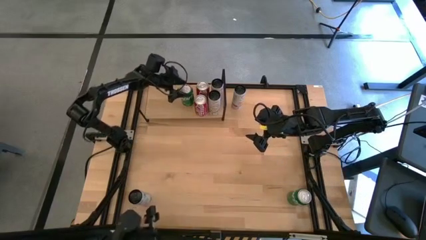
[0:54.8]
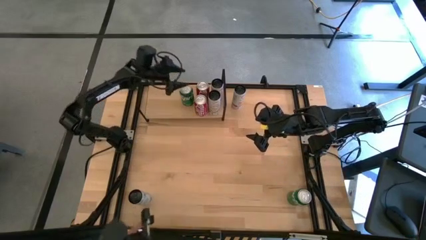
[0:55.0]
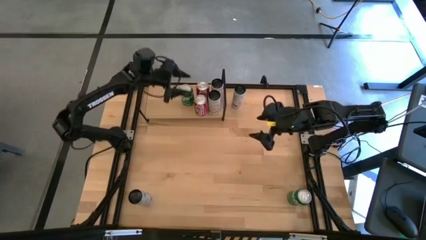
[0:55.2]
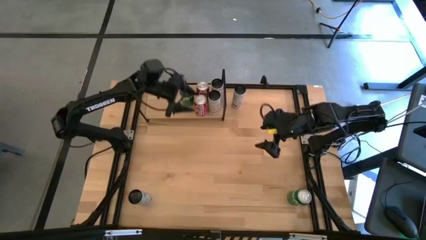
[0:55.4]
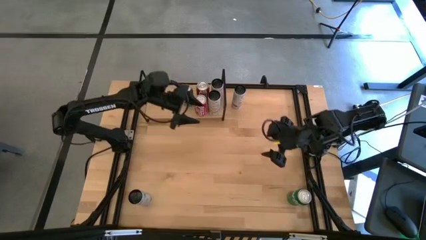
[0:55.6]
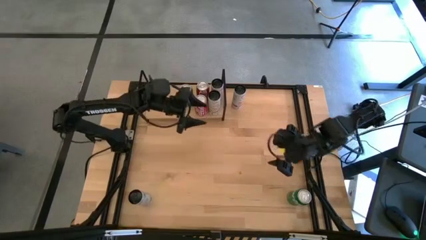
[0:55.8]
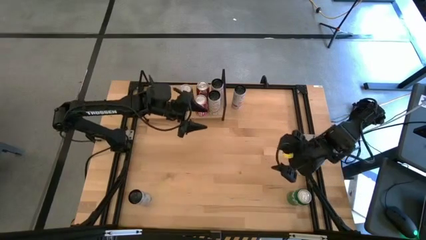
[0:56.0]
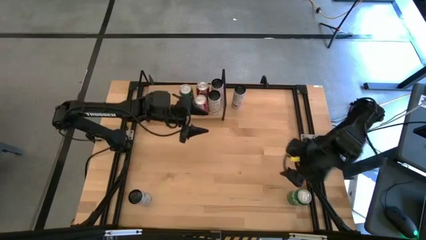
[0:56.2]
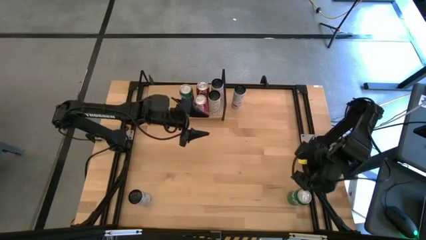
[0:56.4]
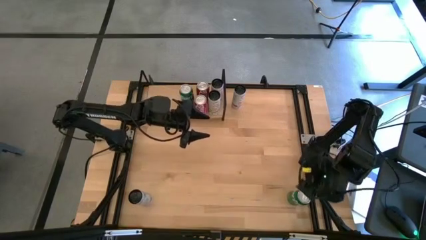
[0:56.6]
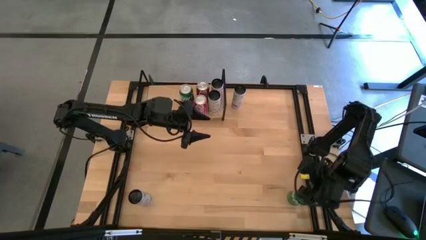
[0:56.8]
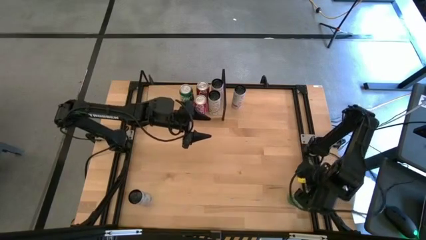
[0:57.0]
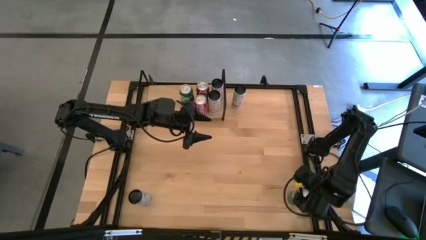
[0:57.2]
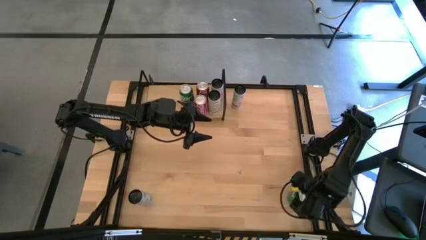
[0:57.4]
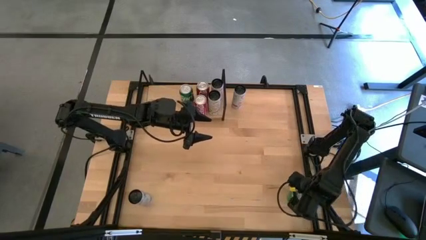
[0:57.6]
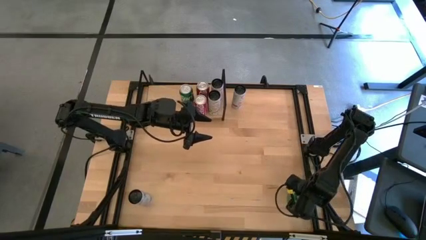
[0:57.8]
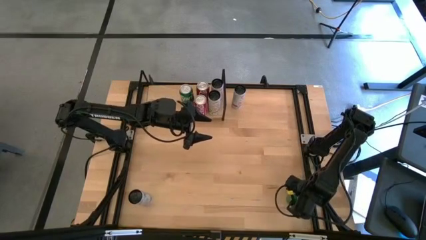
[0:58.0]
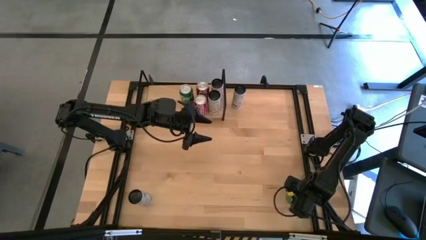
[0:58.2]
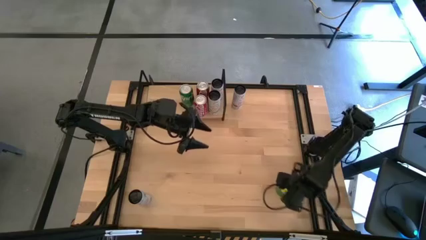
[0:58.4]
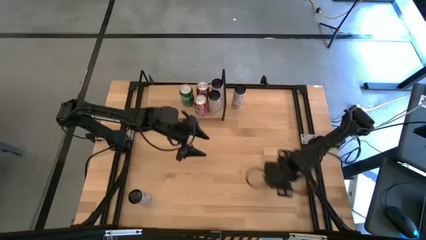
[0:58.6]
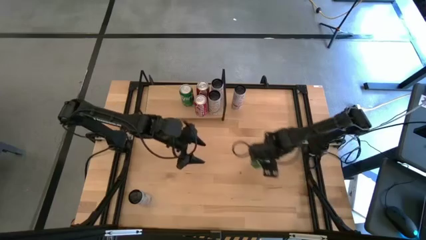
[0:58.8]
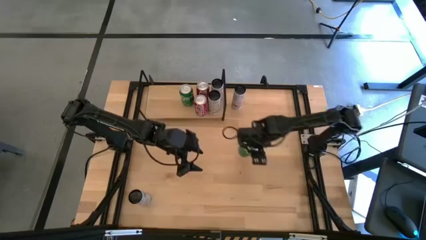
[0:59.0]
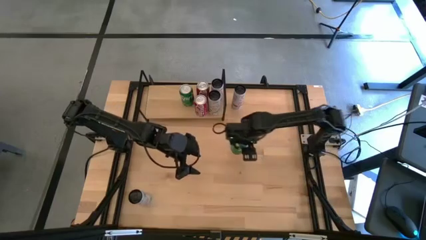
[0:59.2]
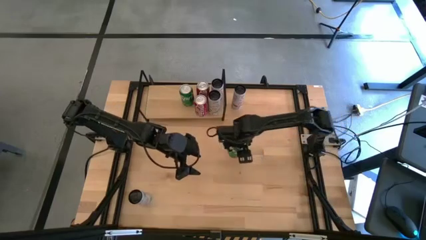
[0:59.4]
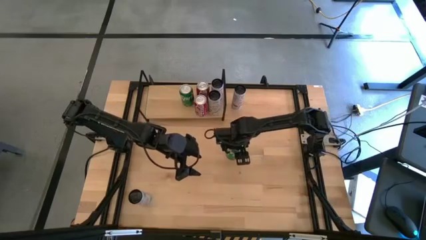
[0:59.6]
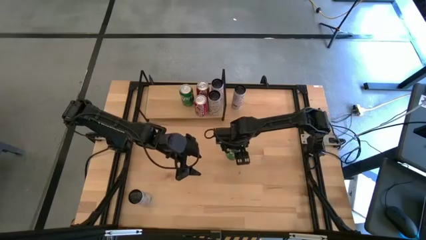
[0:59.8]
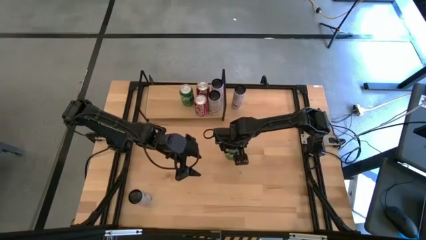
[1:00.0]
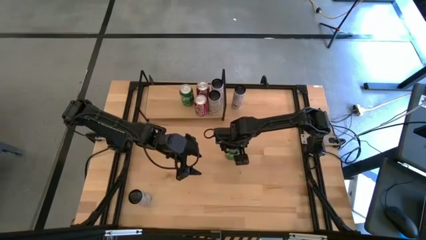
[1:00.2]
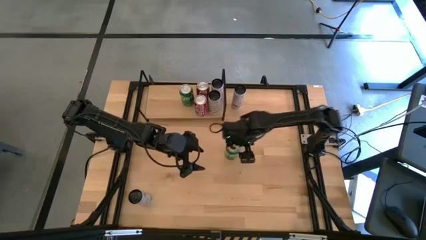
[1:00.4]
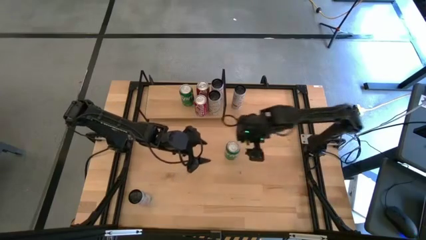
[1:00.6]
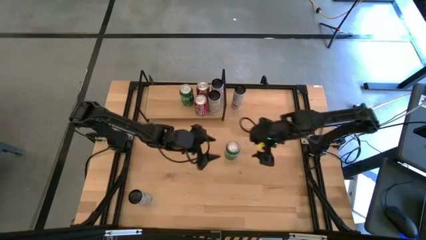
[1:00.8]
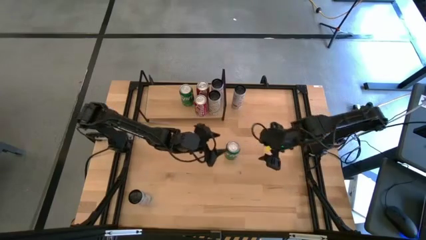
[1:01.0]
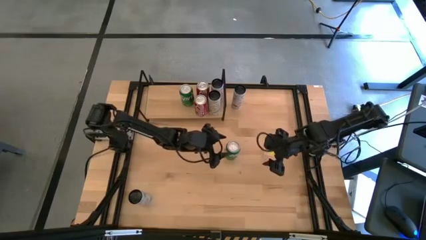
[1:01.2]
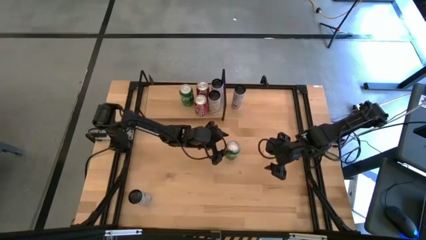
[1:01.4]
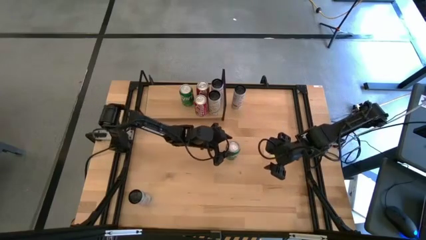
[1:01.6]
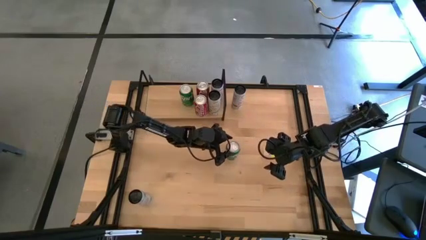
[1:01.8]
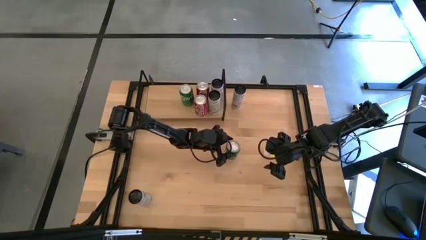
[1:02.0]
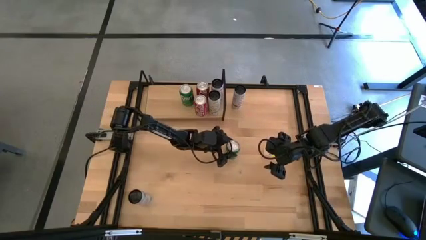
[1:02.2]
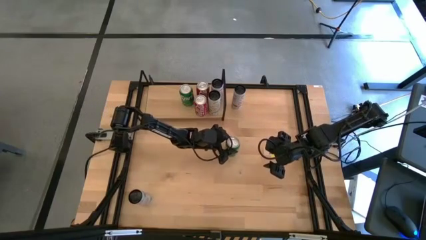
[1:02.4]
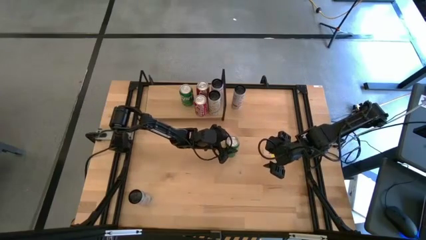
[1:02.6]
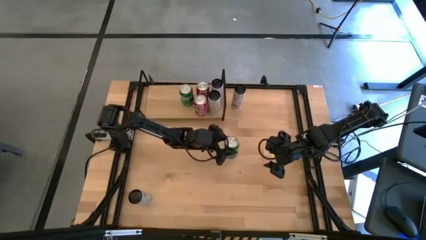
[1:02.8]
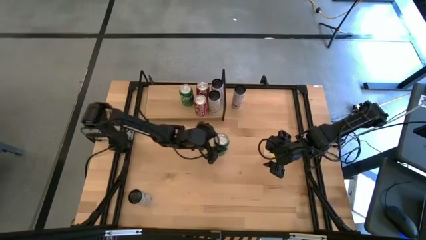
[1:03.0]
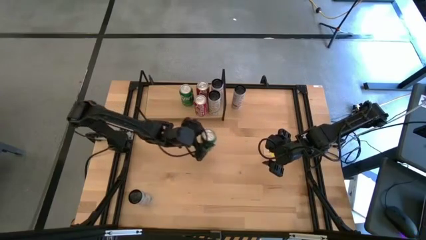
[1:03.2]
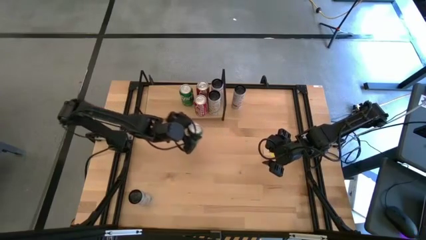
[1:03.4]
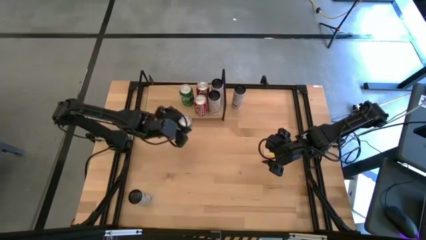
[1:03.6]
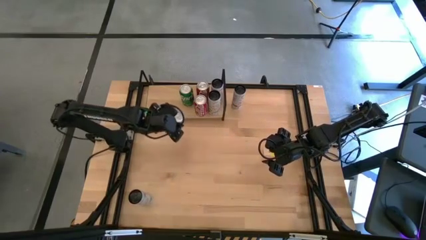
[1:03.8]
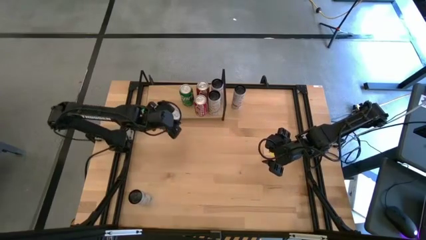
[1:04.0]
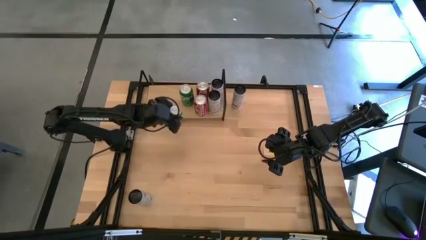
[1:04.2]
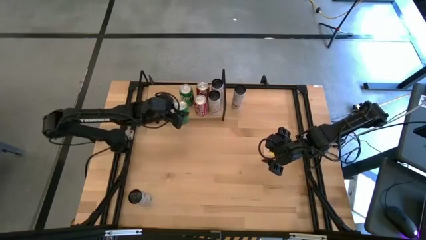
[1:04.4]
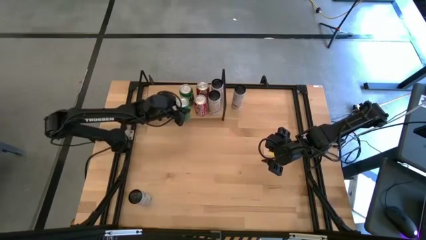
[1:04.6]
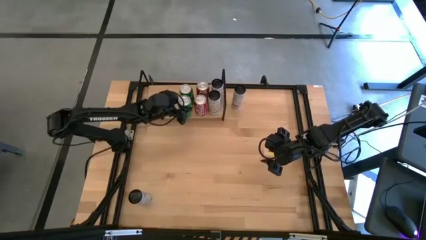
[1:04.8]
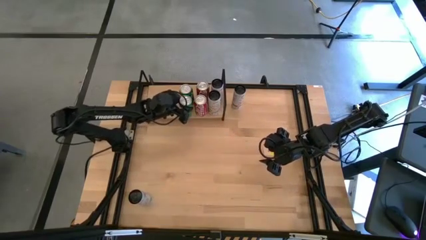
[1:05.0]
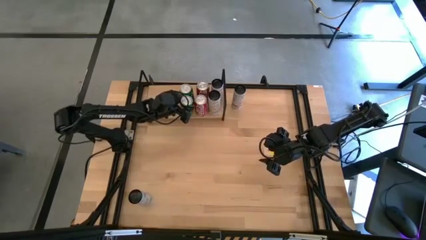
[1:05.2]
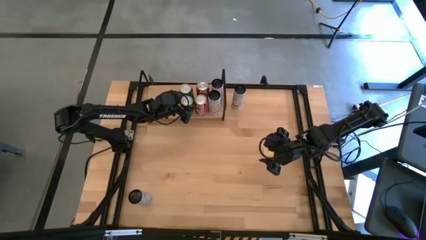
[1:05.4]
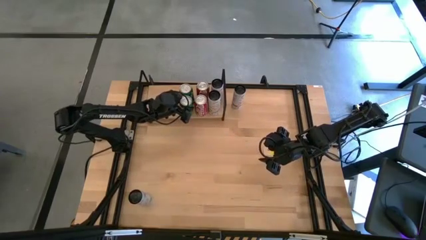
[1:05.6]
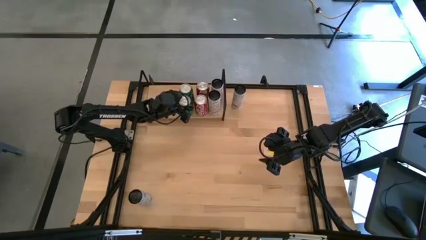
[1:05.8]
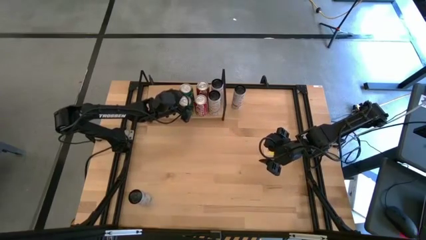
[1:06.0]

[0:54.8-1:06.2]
Task: Place canned beverage on shelf
Put the green soda can on the shelf aligned with the other green soda can

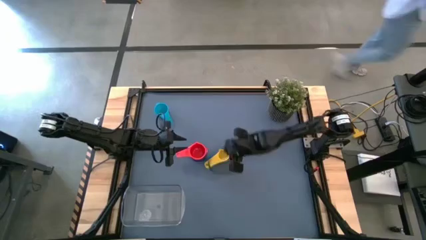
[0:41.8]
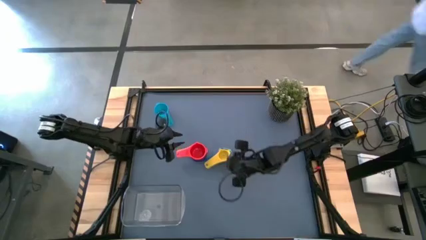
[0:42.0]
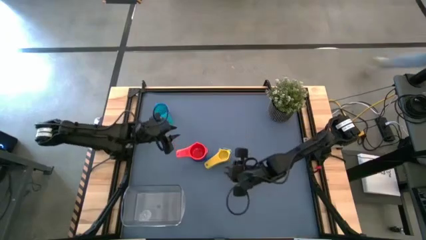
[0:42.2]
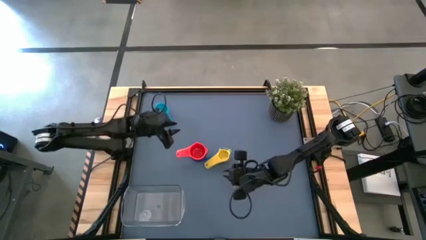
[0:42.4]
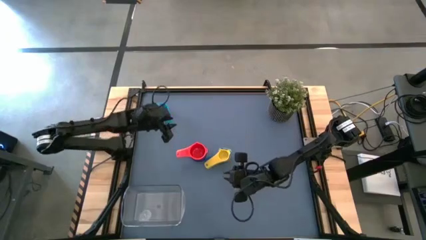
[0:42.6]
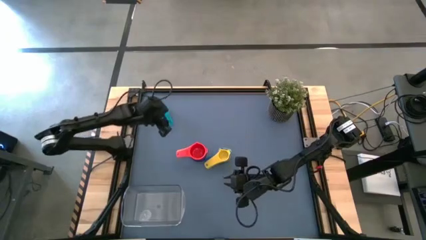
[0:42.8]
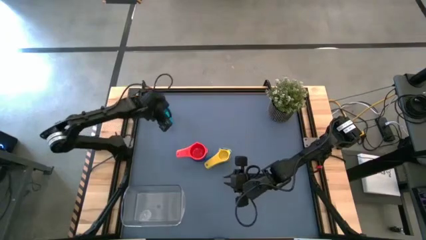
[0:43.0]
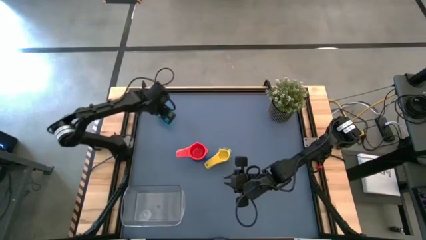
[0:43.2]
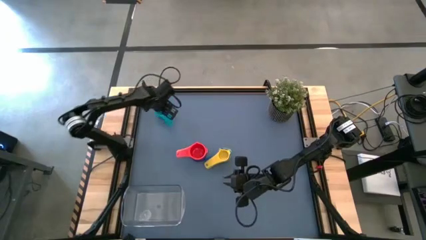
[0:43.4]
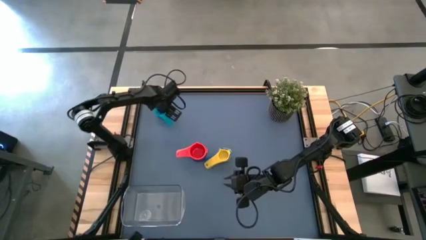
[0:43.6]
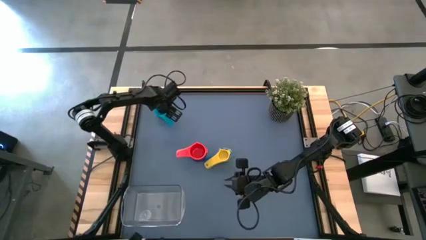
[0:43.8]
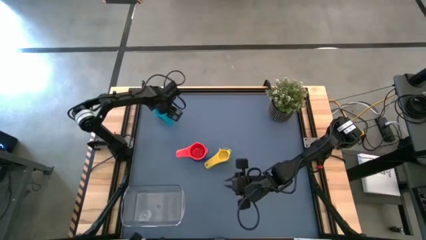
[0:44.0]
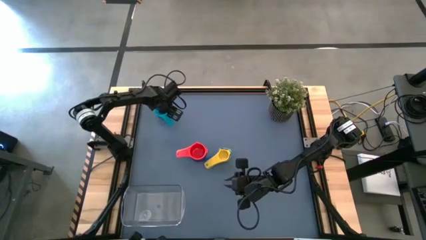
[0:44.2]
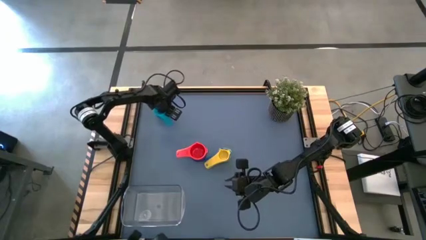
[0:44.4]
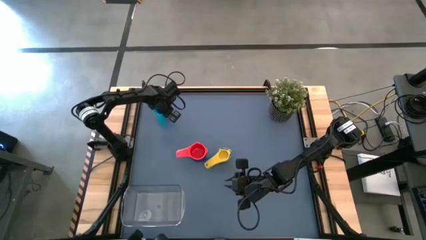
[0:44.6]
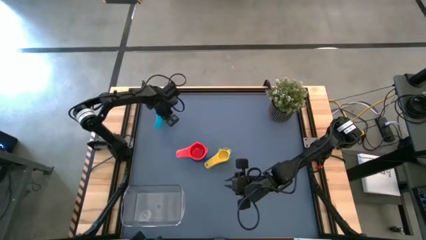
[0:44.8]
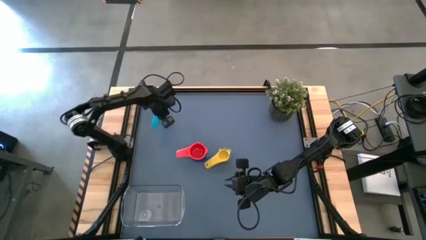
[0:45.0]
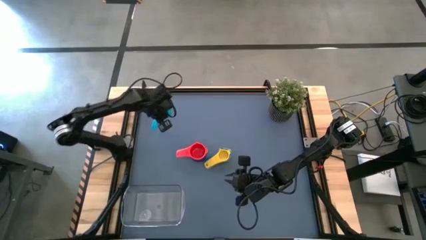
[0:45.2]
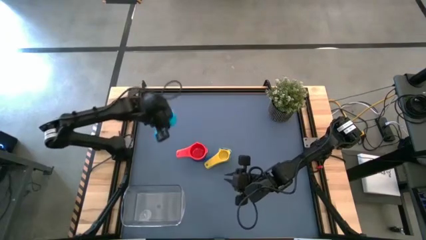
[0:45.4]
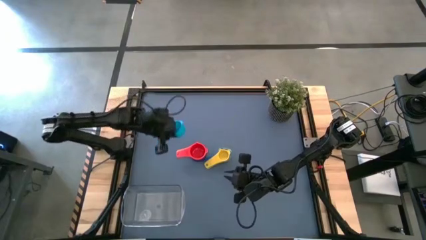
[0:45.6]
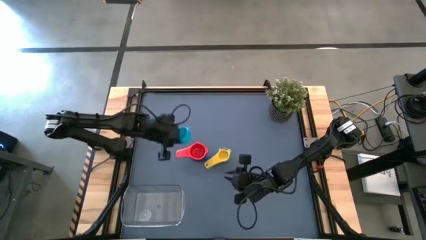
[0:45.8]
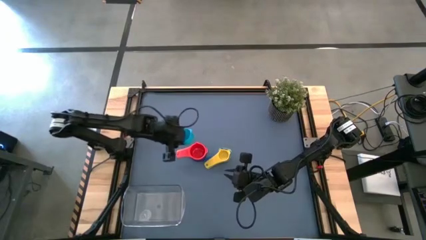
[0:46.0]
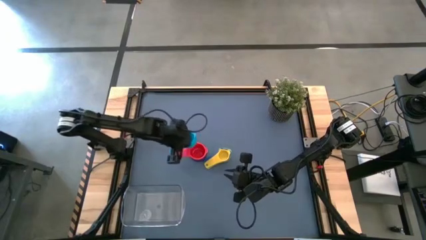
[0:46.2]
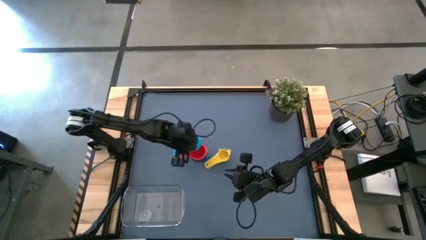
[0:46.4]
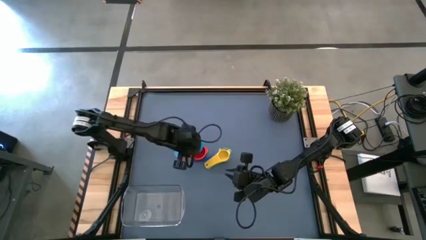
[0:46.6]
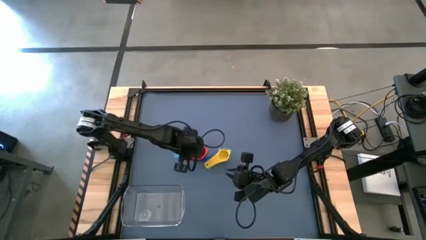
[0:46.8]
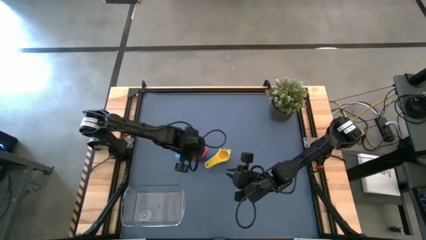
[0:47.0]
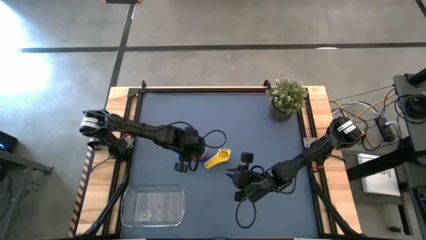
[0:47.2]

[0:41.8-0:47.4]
Task: Nest measuring cups in basket
Stack the light blue measuring cup on top of the red measuring cup
